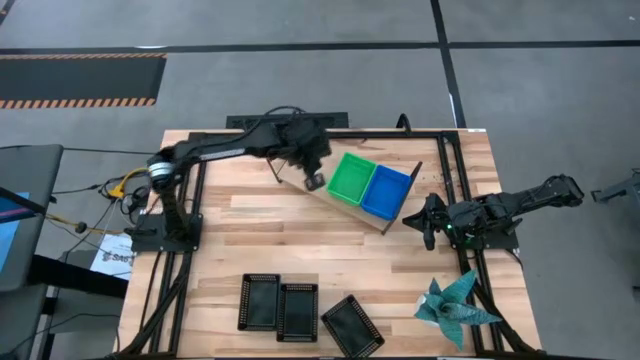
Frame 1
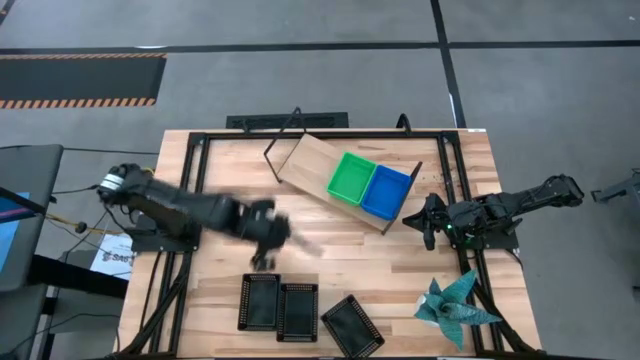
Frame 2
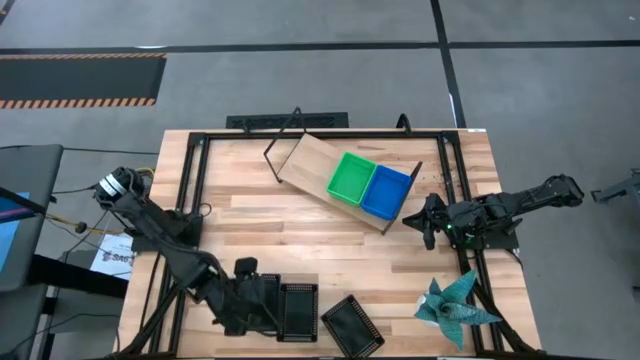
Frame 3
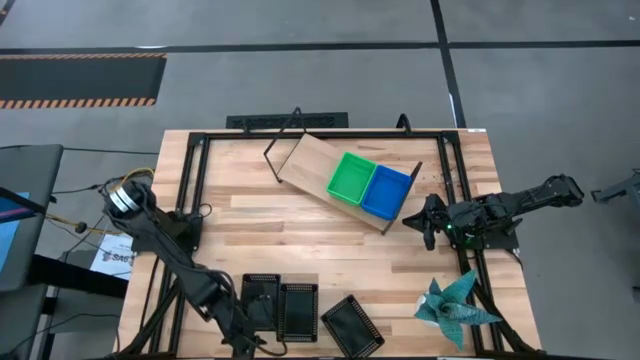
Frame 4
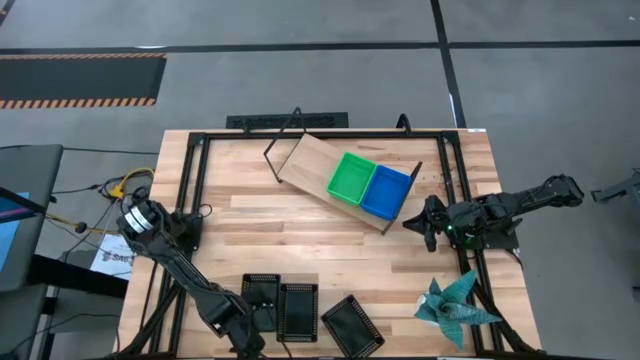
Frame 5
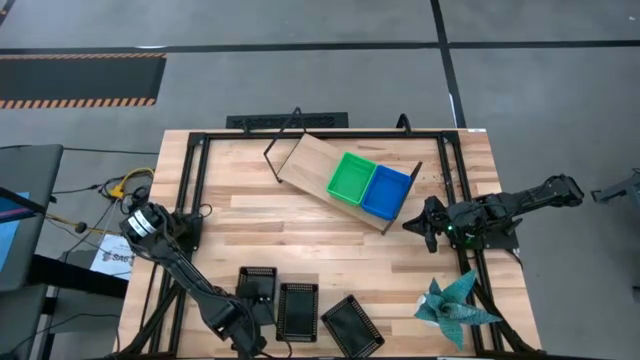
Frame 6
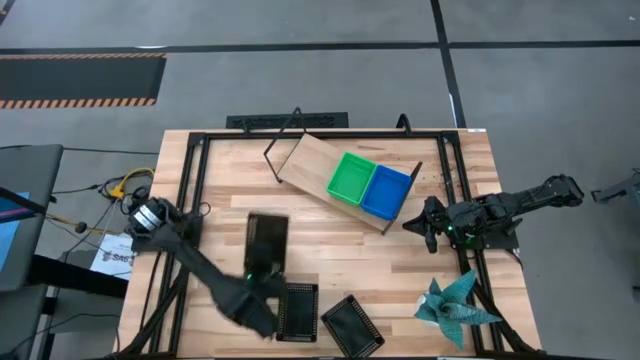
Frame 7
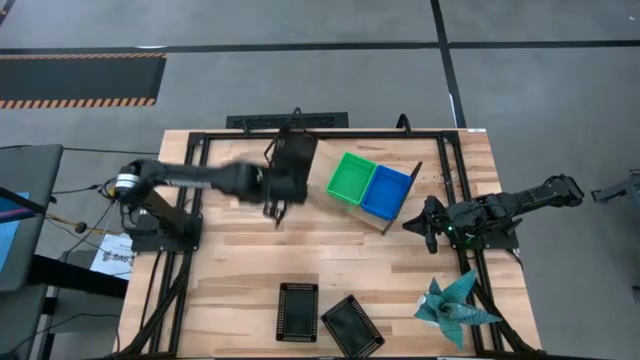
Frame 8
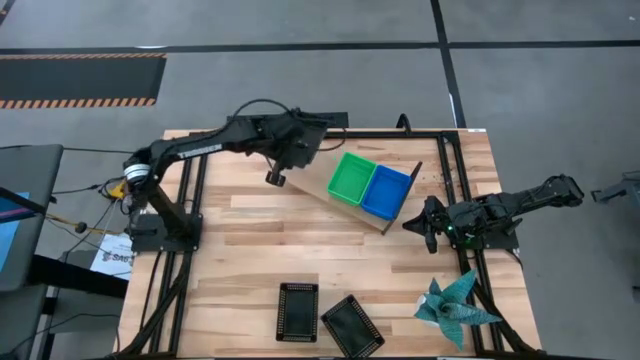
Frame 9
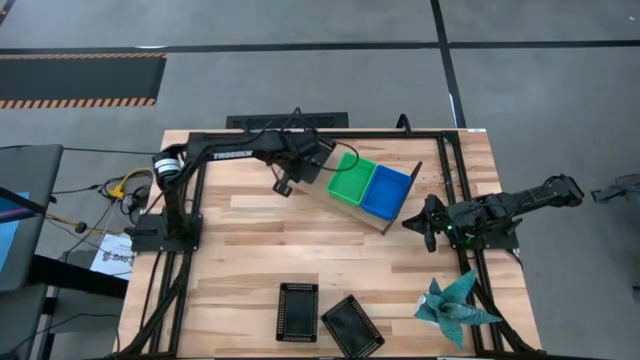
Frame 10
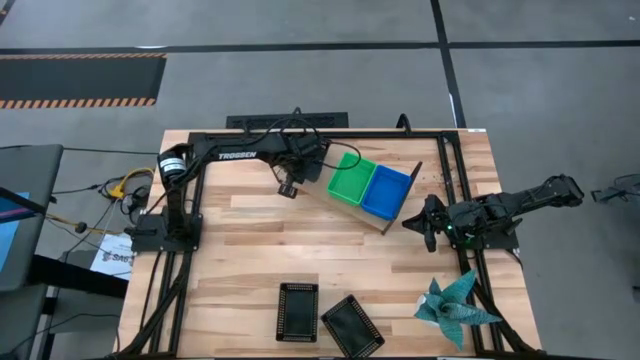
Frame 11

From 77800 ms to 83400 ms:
Task: Stack baskets on shelf by color
Put the left black bin on the shelf

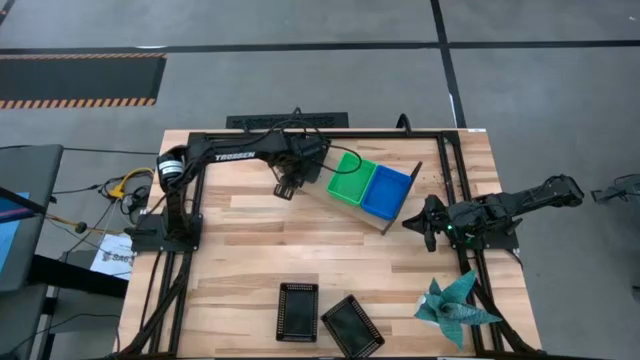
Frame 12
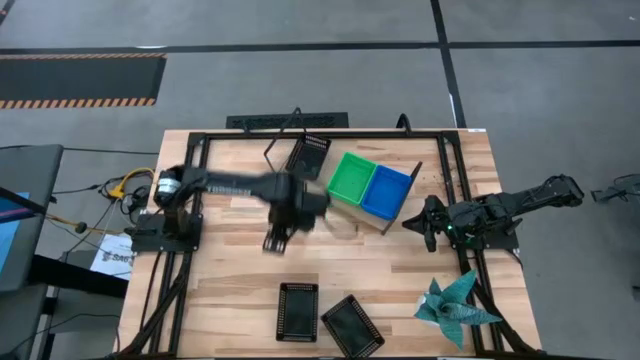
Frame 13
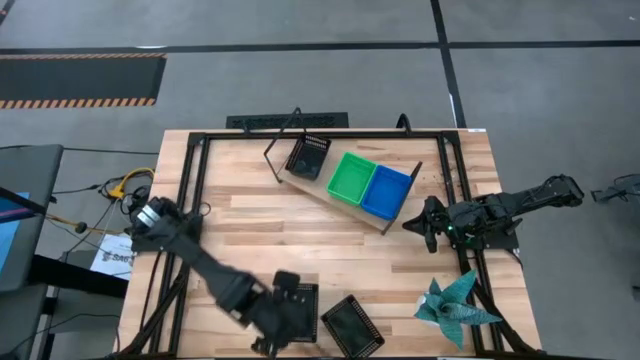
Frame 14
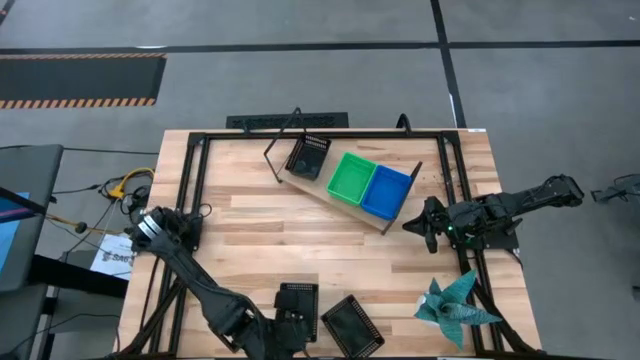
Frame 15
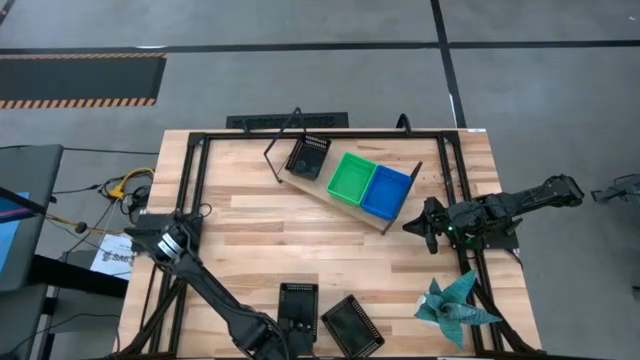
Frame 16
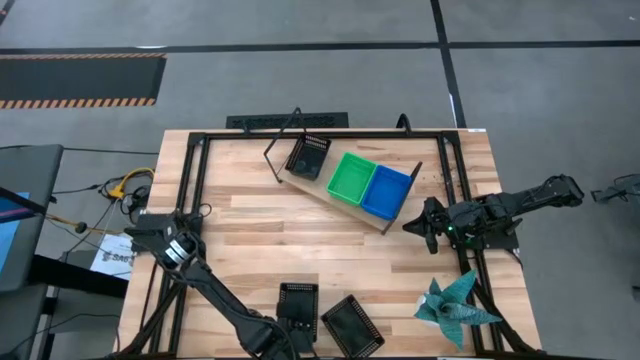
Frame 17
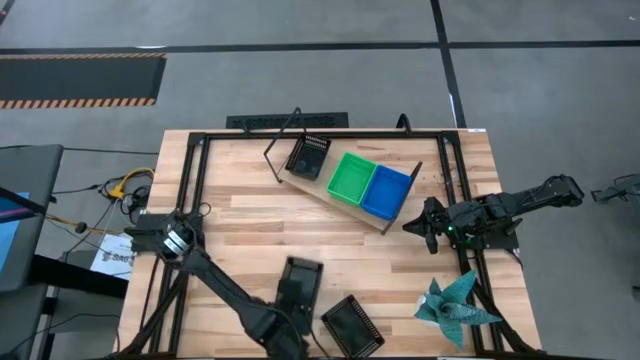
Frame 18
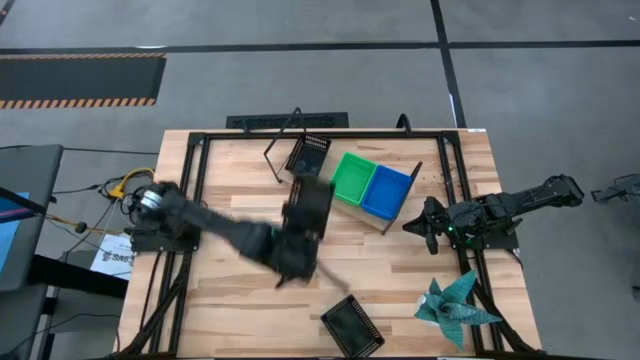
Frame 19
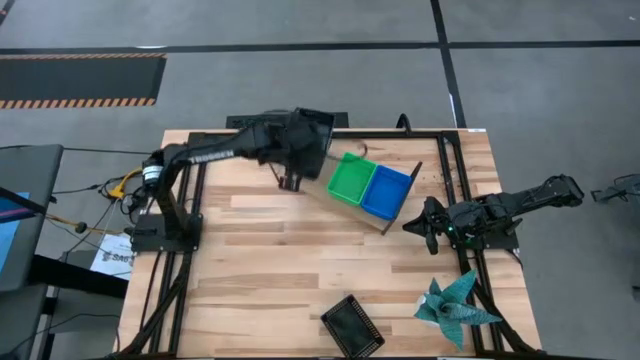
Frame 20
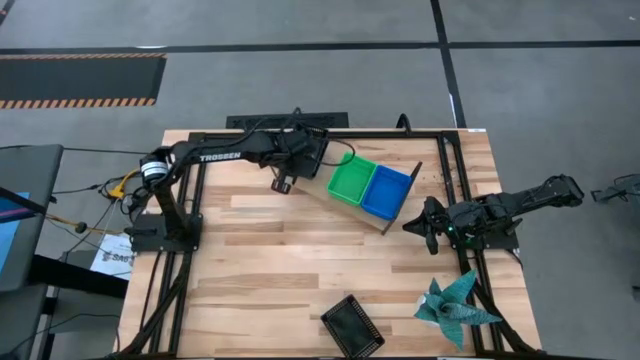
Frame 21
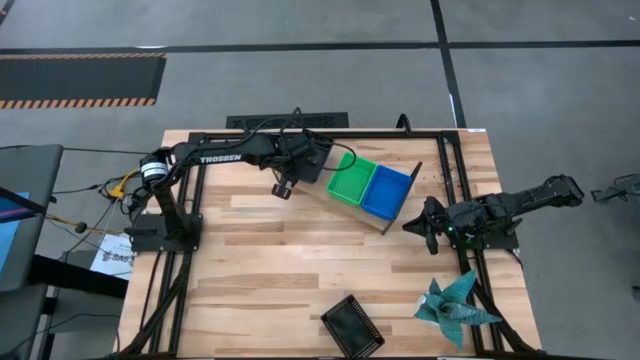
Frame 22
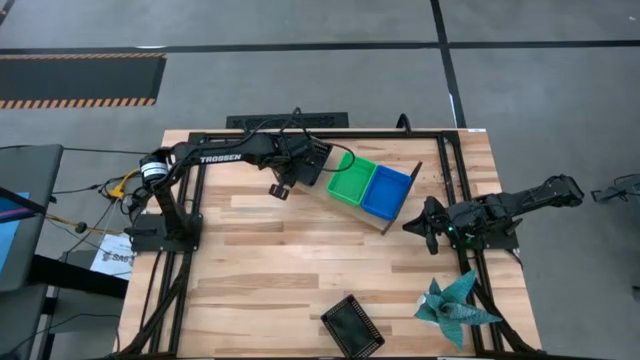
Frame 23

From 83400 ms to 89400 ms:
Stack the left black bin on the black bin on the shelf

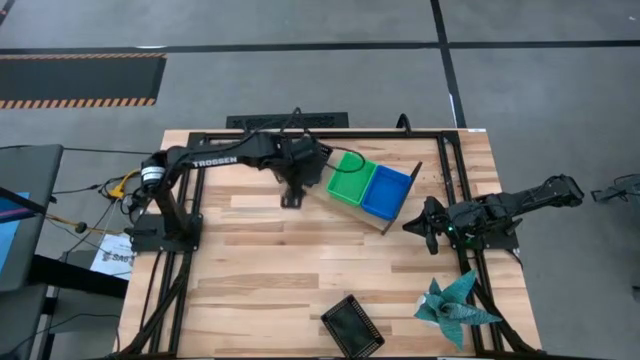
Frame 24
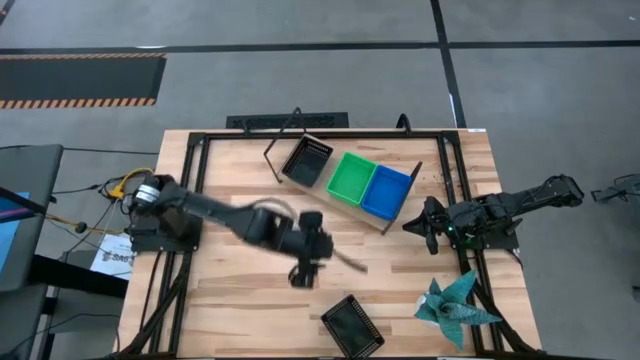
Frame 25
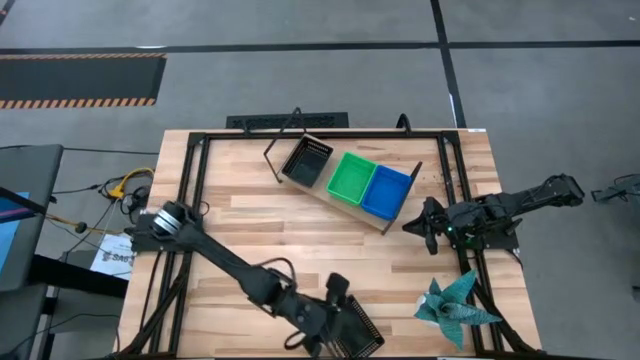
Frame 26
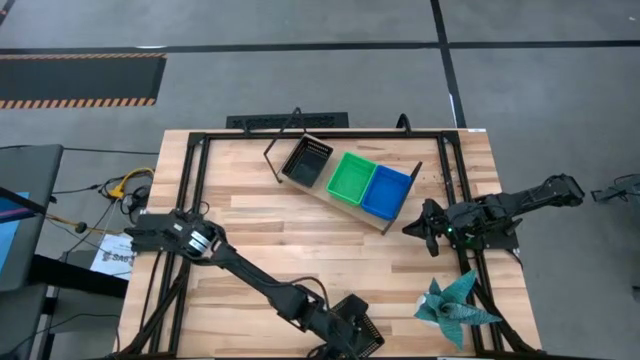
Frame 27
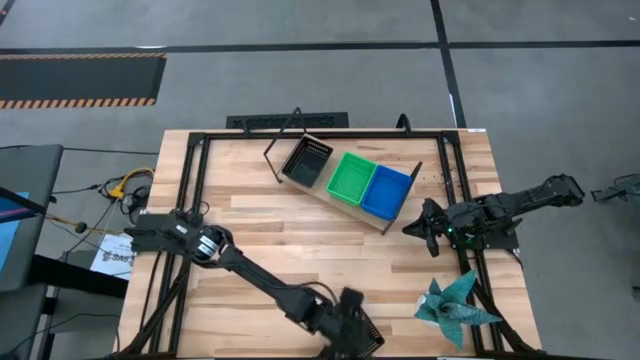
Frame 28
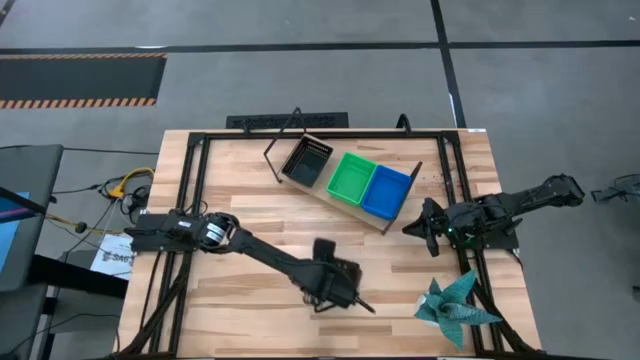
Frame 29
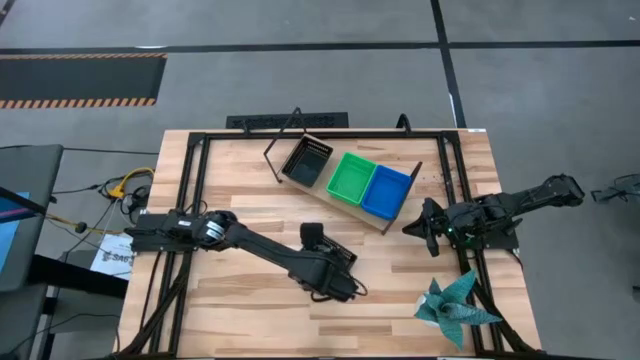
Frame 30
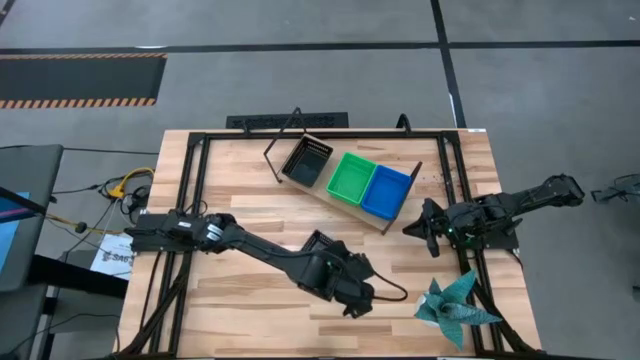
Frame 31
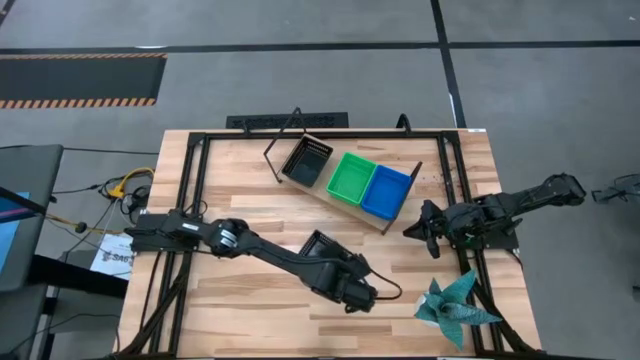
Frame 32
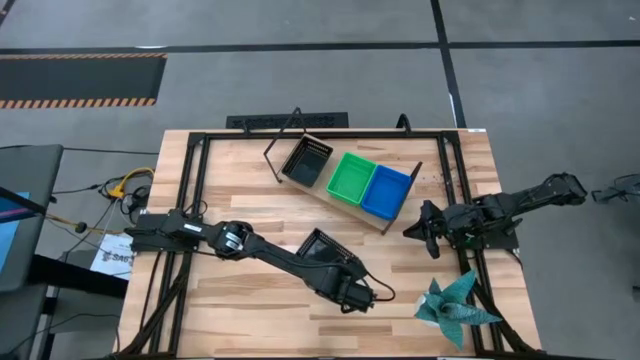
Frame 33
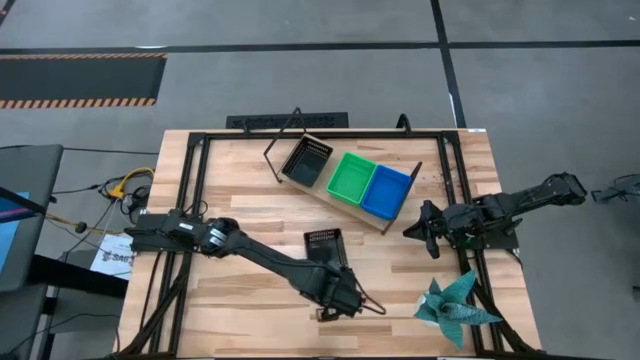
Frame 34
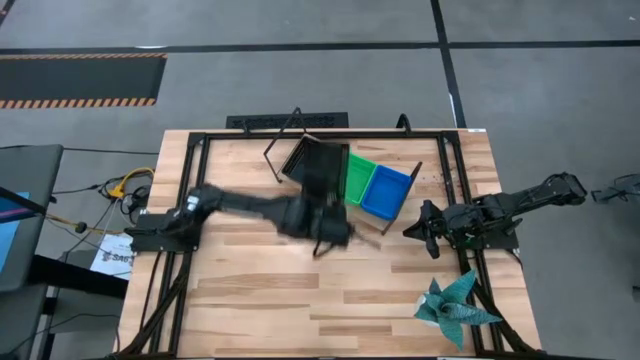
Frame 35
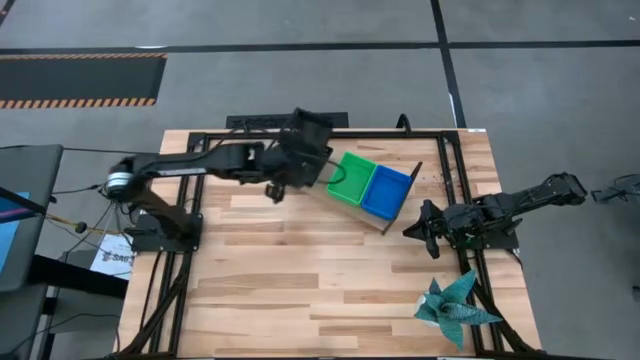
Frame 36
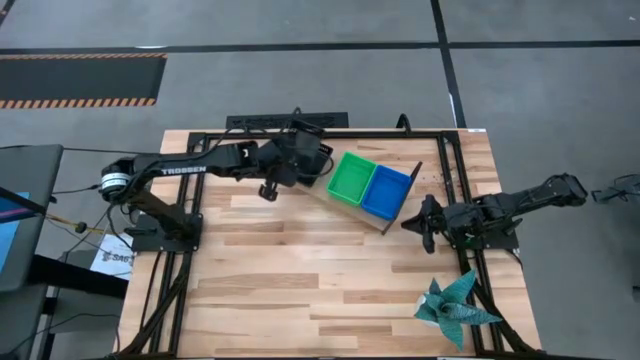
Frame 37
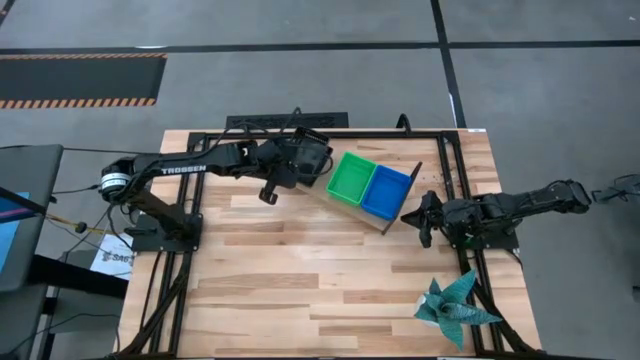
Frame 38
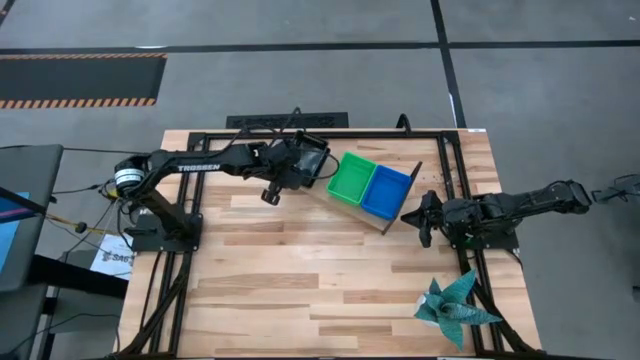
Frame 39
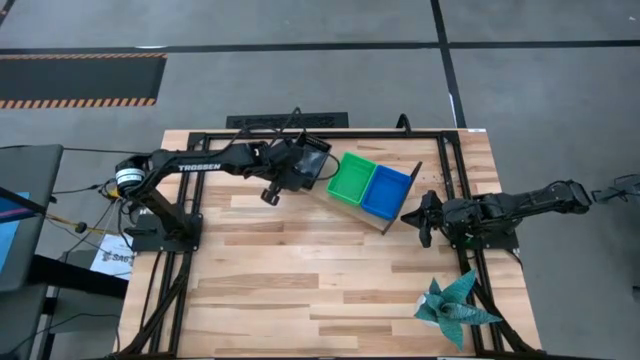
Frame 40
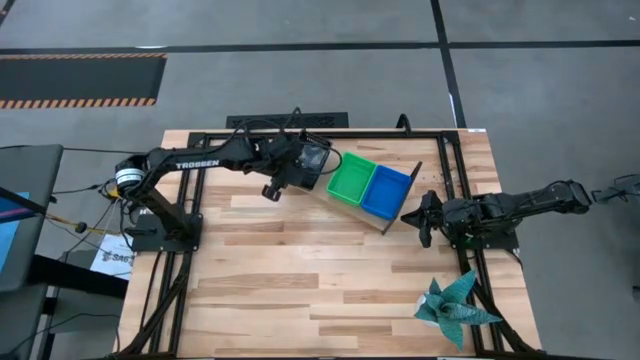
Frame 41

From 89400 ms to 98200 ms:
Stack the black bin on the black bin on the shelf
